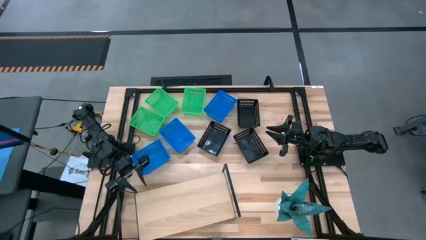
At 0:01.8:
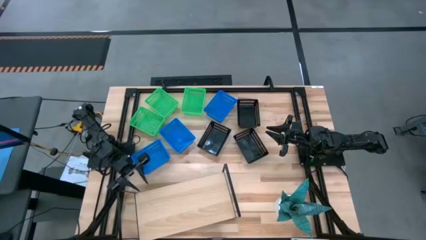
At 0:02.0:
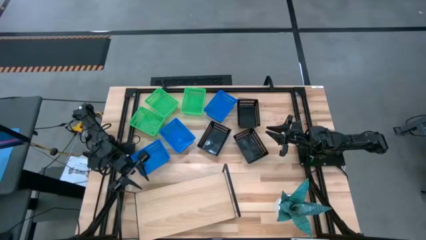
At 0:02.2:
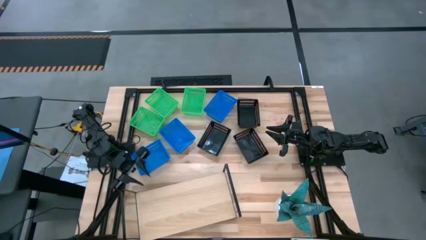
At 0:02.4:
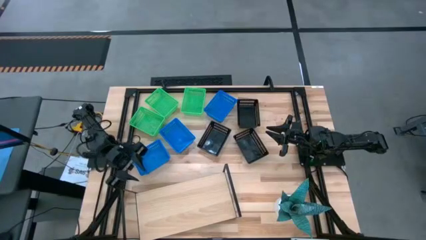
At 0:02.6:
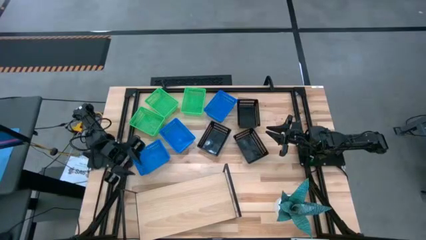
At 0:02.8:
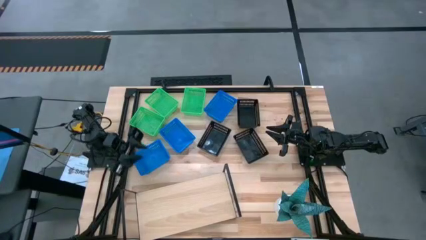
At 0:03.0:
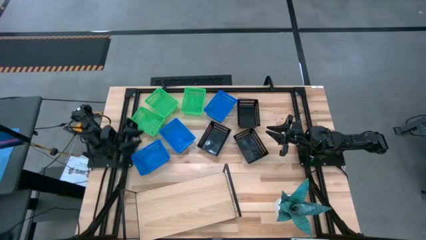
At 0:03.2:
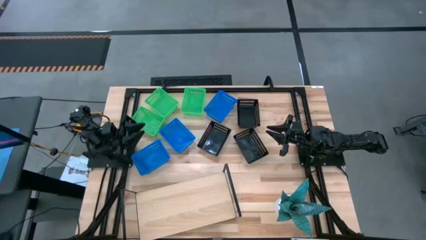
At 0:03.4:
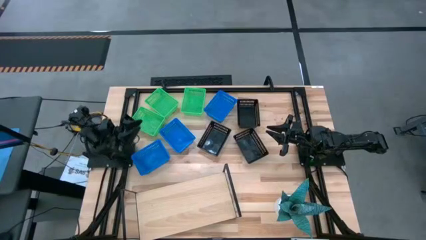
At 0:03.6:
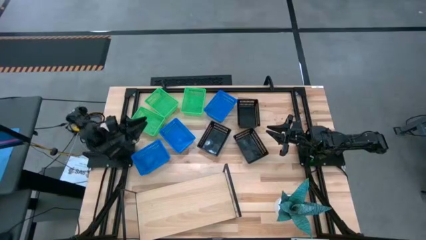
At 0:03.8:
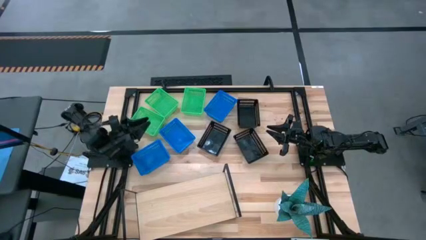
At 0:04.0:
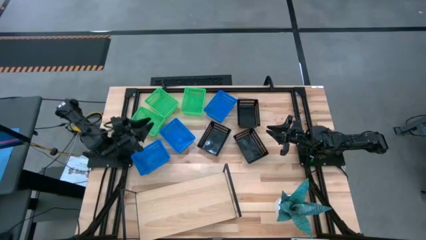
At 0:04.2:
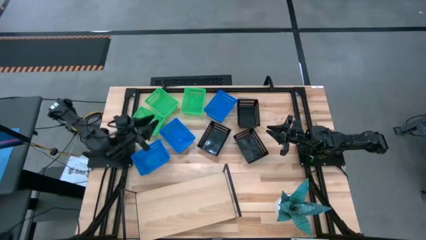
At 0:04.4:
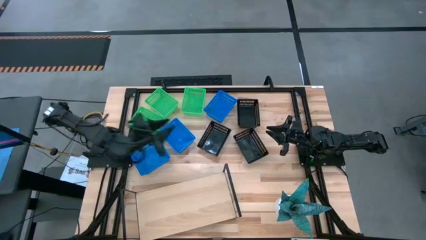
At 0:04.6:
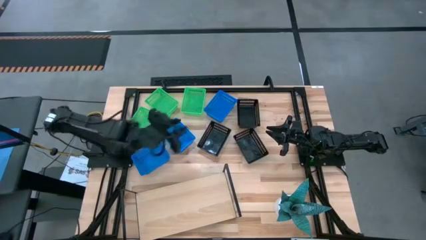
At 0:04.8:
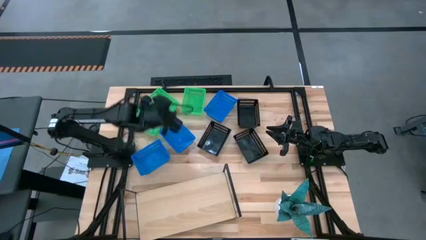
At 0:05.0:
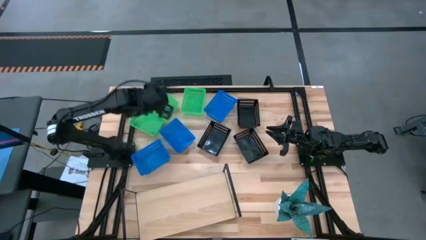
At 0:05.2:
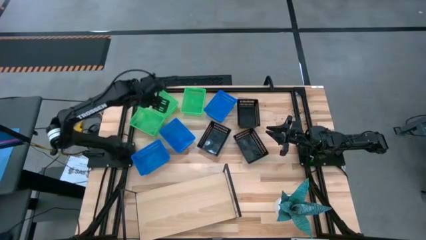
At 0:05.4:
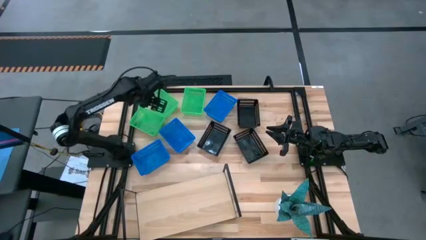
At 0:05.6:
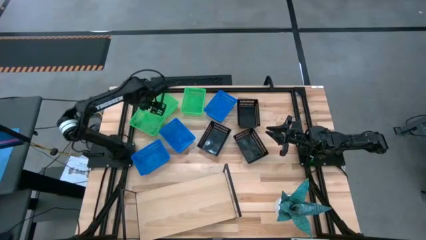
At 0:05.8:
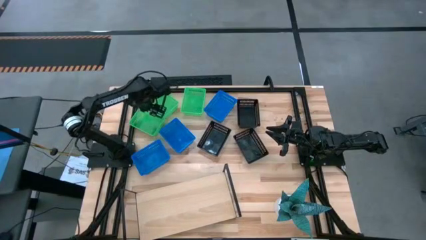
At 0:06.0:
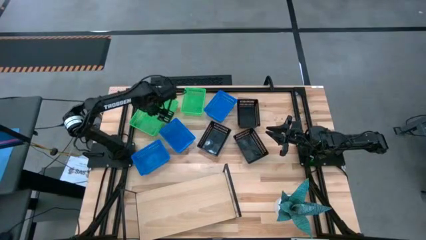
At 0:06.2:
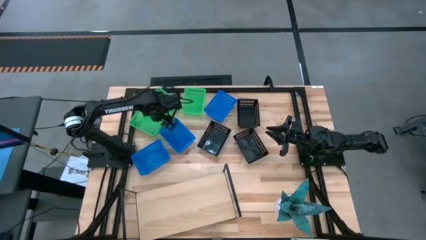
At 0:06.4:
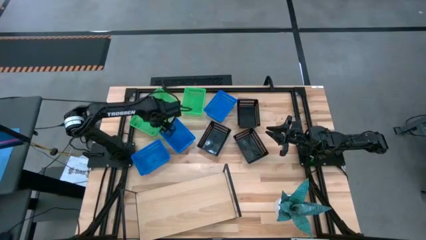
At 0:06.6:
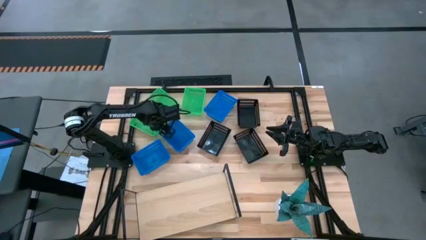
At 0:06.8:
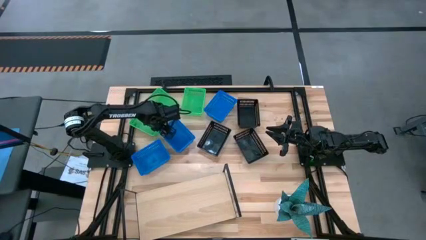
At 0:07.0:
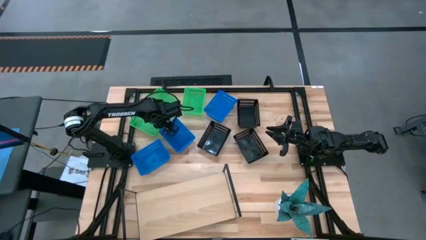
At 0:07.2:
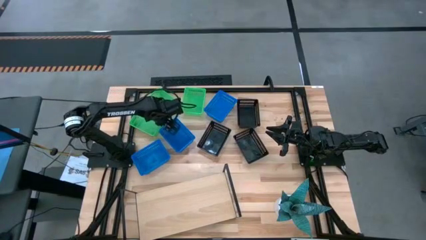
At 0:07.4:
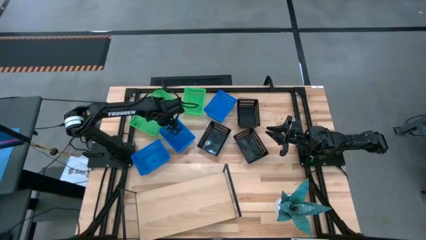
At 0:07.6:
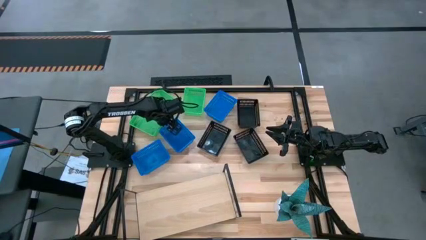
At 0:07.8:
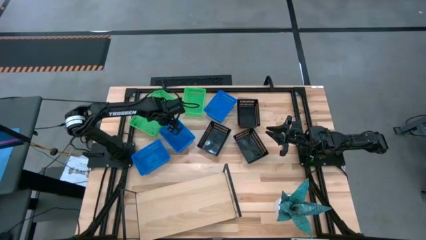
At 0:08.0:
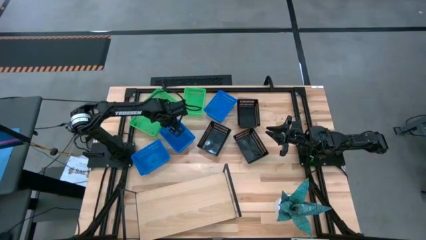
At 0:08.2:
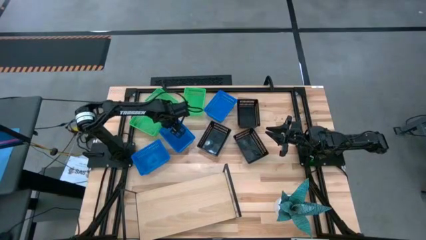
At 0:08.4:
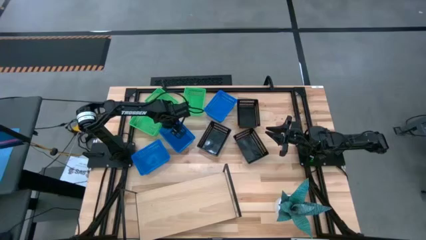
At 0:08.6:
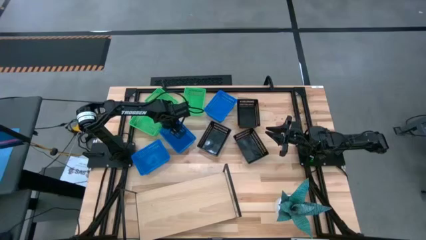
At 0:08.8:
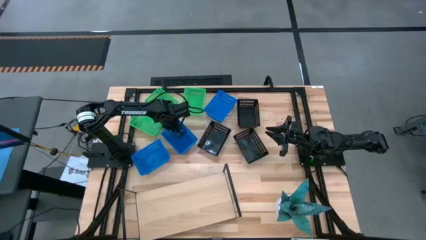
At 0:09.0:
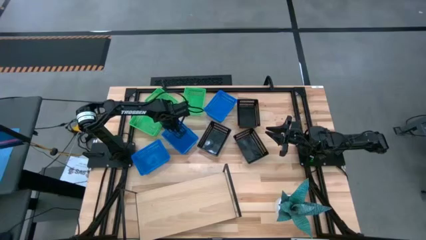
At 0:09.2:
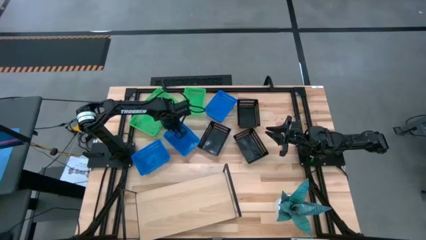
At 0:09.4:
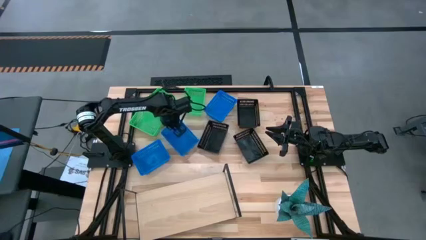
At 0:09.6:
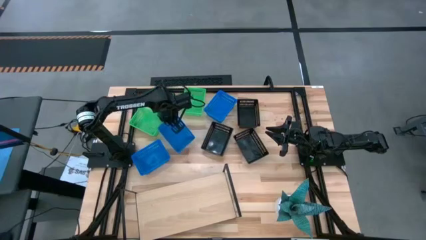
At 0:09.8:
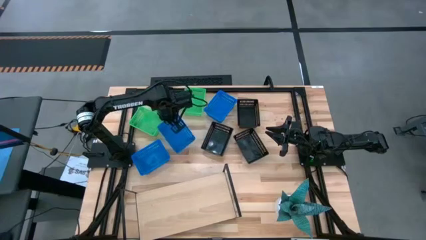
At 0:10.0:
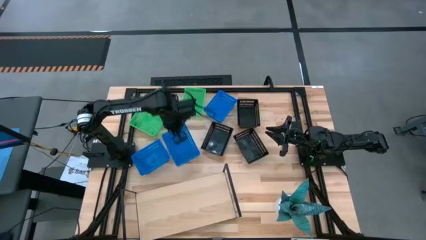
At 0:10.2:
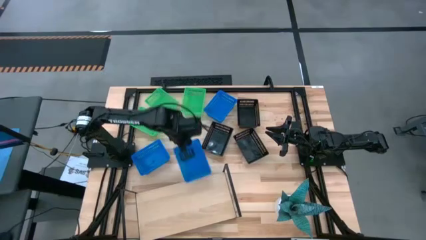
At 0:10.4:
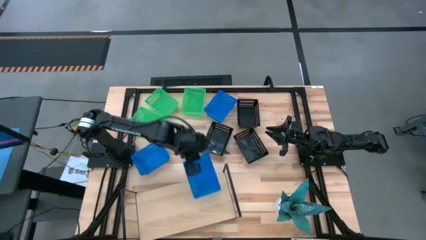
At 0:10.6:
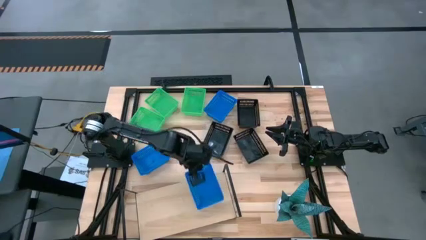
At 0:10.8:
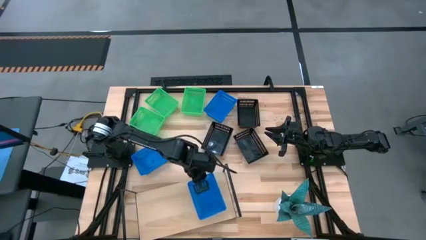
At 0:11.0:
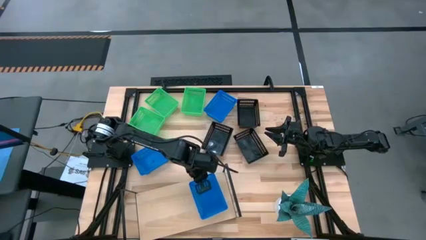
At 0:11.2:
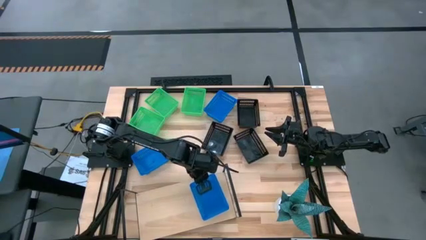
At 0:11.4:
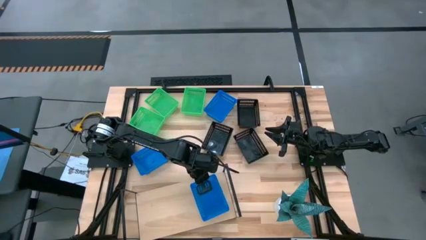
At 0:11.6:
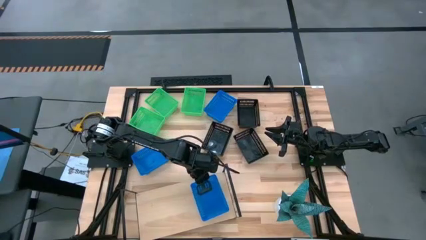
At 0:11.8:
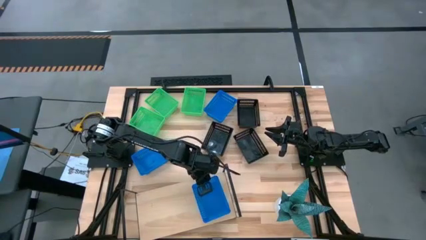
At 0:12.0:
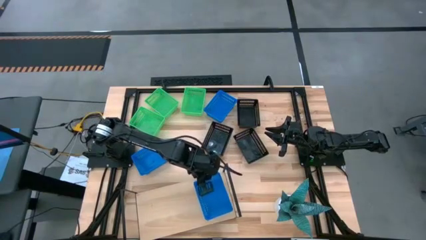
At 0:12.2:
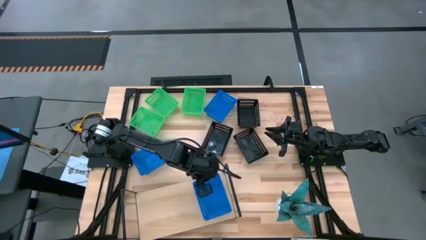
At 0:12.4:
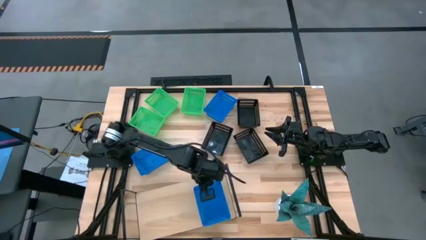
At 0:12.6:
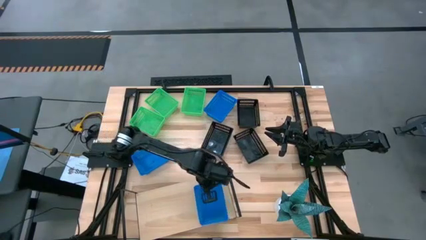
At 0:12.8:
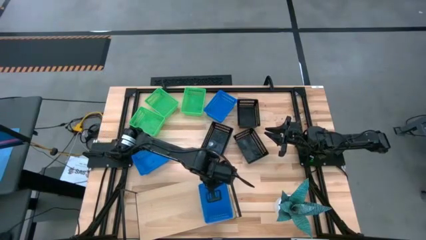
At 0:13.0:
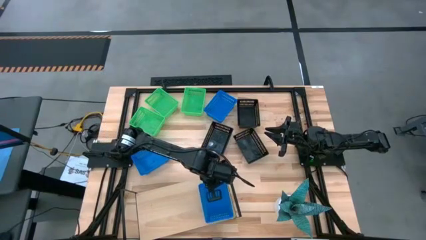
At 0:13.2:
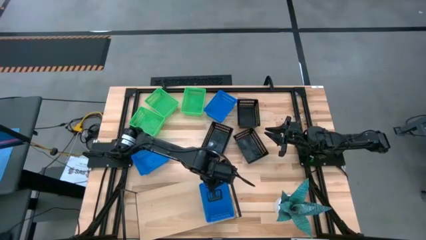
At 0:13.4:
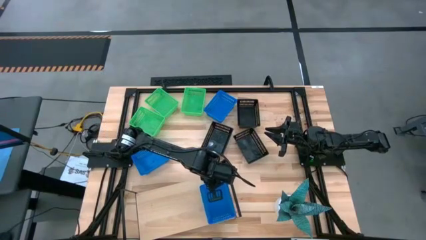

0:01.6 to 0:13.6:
Task: Stack baskets on shelf by color
Put the middle blue basket on the shelf
